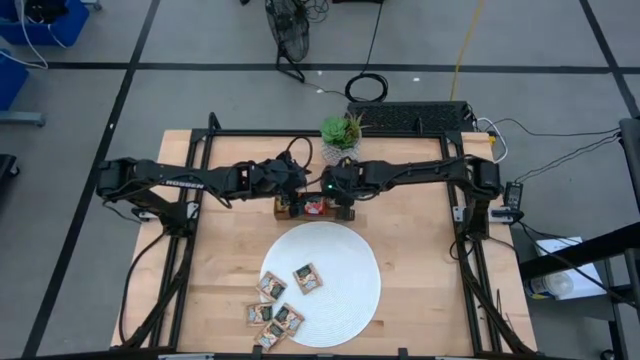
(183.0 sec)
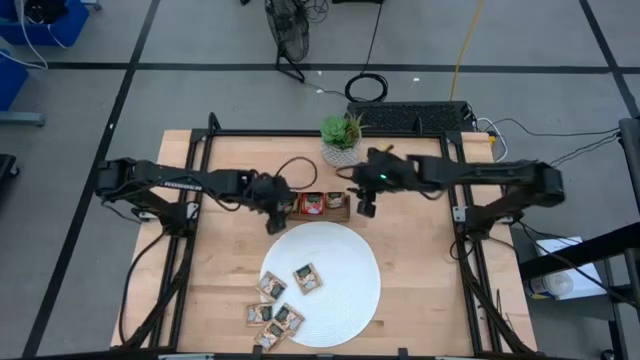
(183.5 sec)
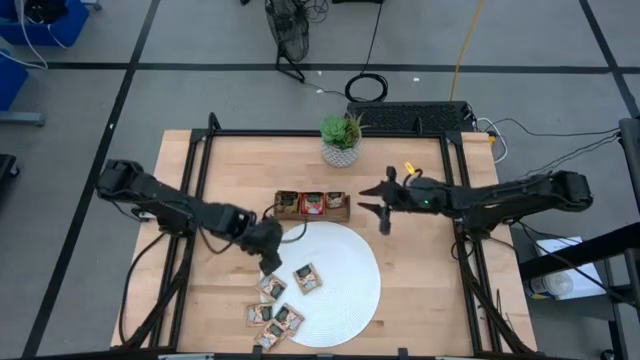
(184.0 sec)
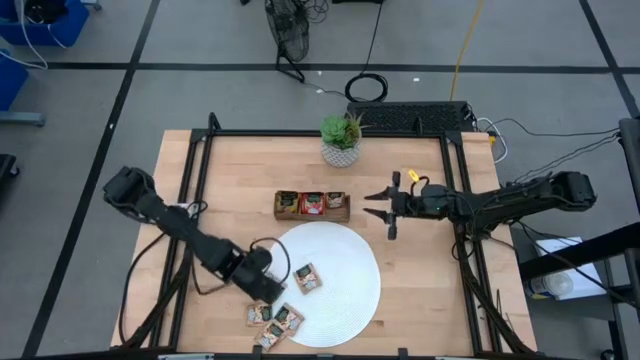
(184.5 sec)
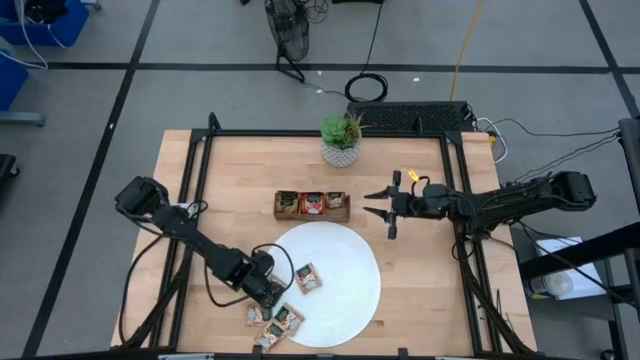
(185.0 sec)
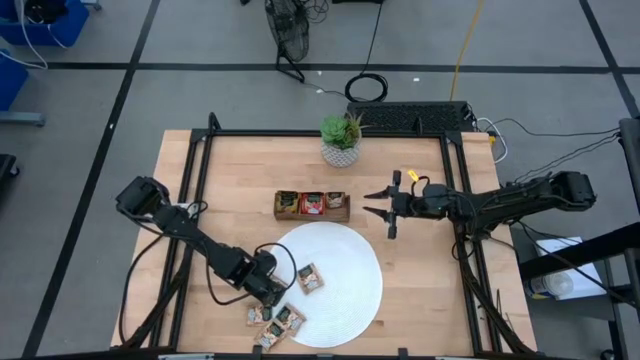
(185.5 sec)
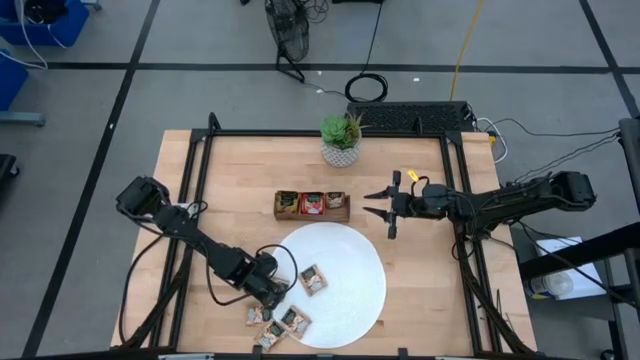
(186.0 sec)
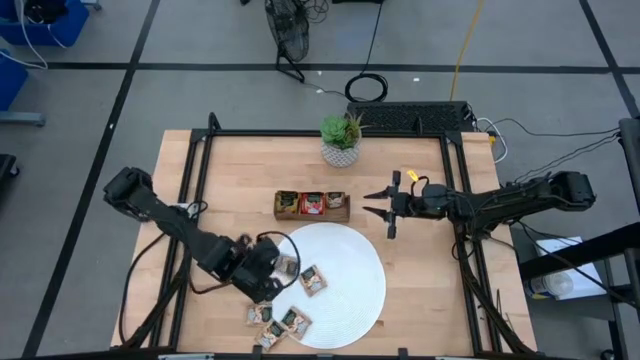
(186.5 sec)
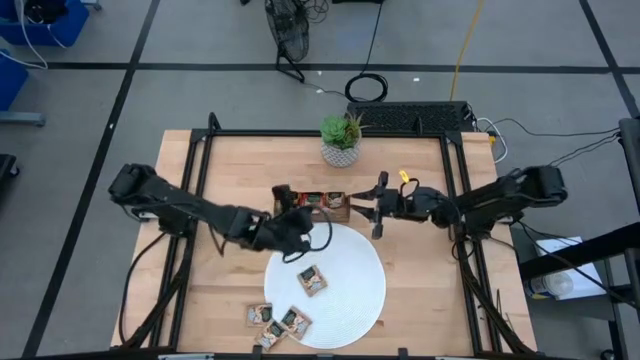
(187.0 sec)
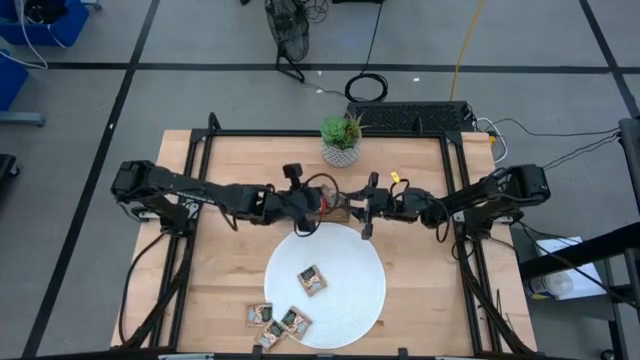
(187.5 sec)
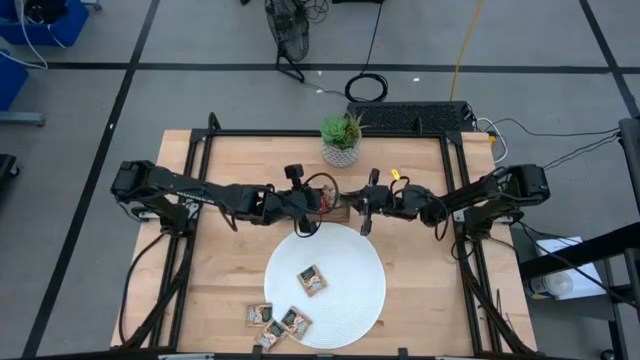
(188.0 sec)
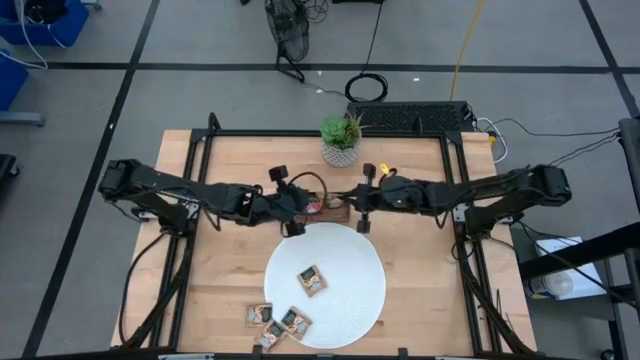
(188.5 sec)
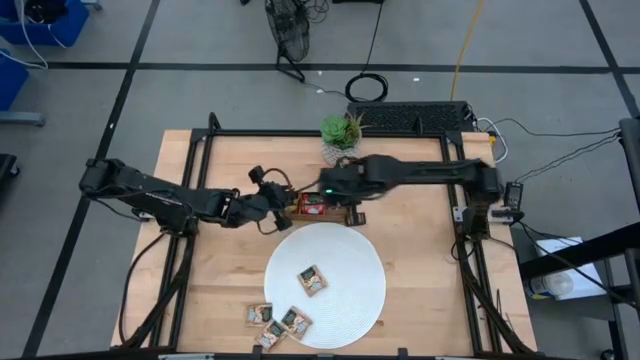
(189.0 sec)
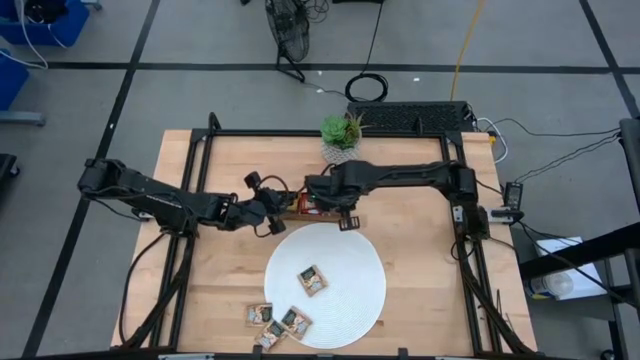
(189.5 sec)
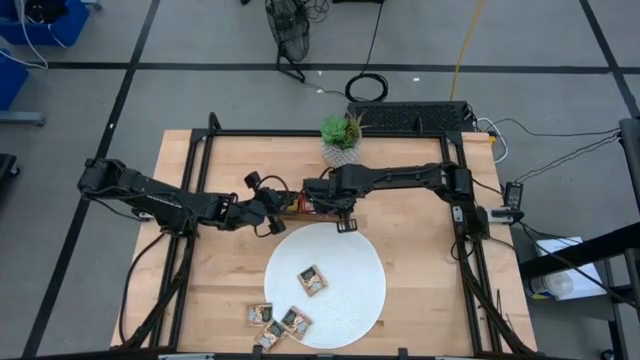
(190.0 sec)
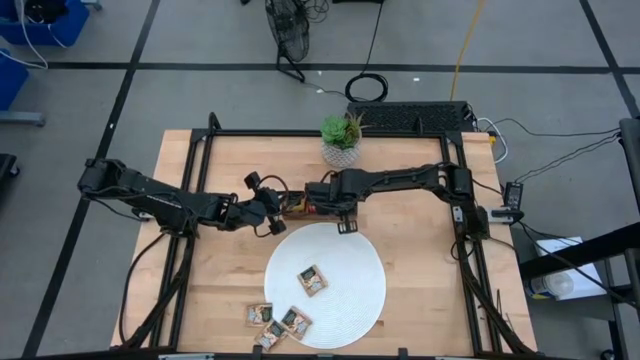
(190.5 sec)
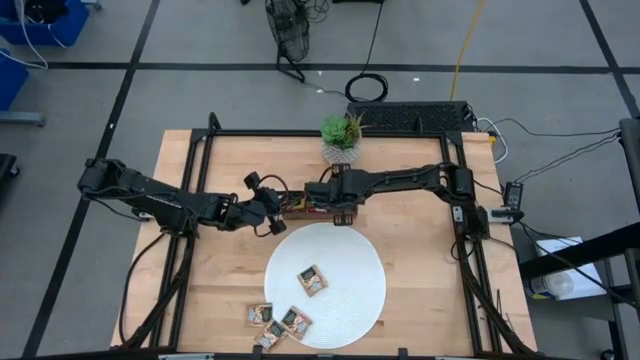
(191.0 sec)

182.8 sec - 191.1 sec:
Task: Pick & Place Tea
Put the vanilla tea bag into the wooden organizer

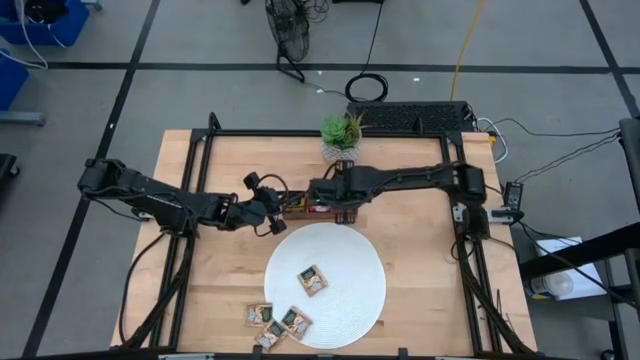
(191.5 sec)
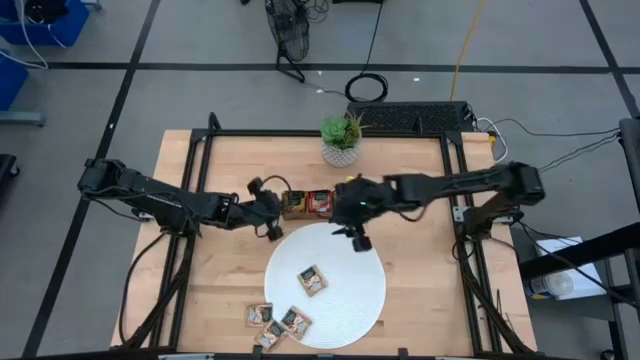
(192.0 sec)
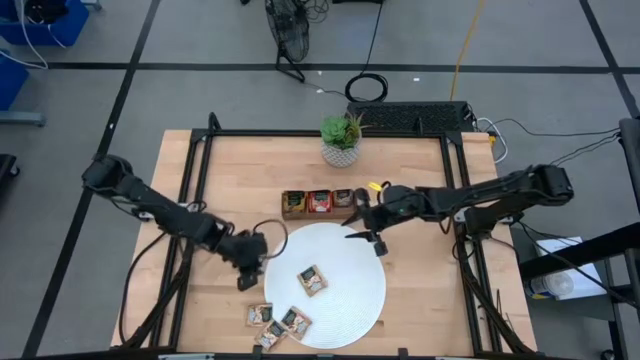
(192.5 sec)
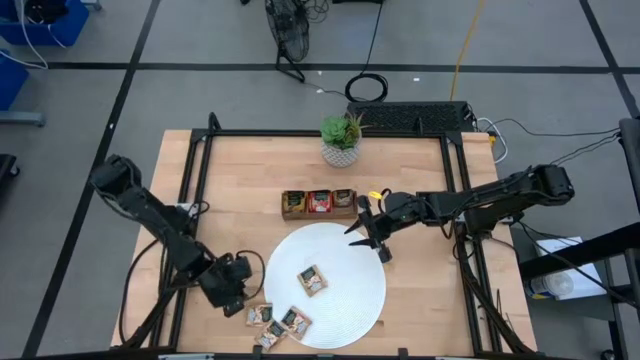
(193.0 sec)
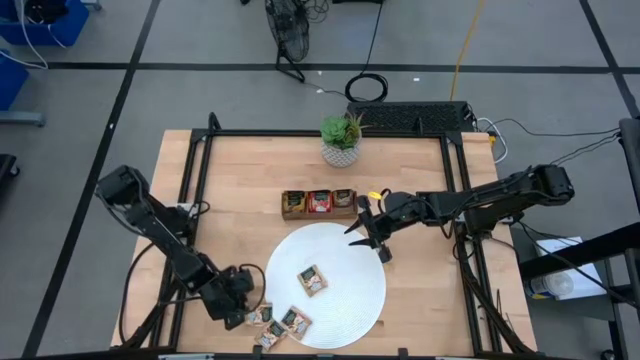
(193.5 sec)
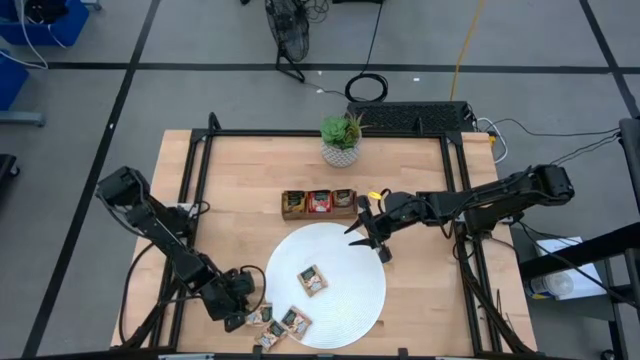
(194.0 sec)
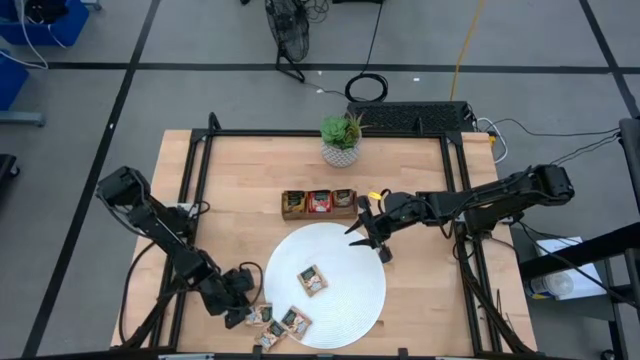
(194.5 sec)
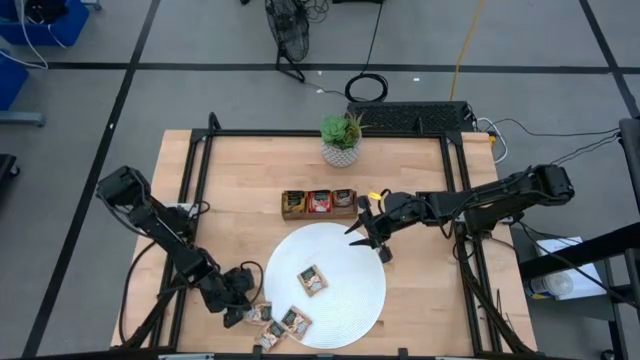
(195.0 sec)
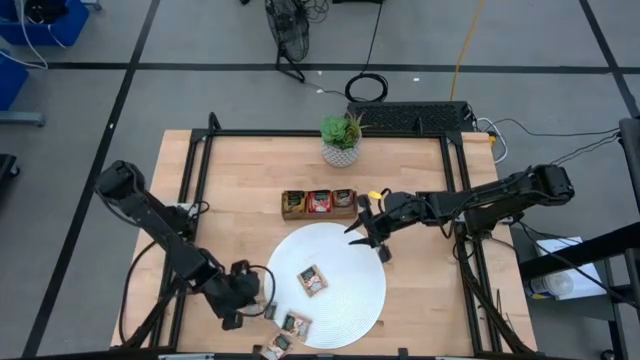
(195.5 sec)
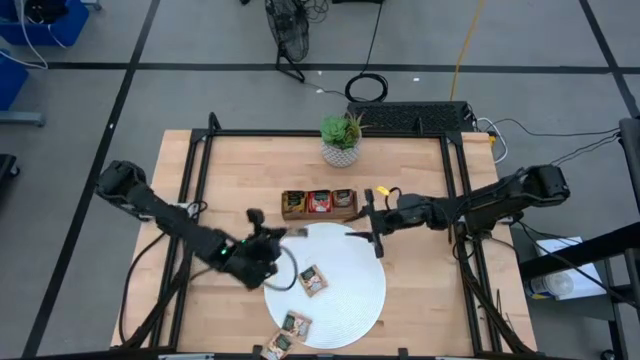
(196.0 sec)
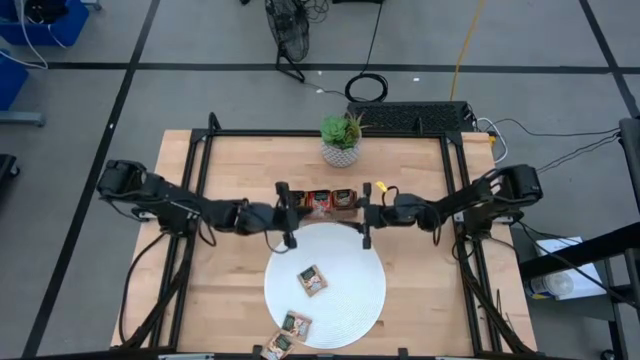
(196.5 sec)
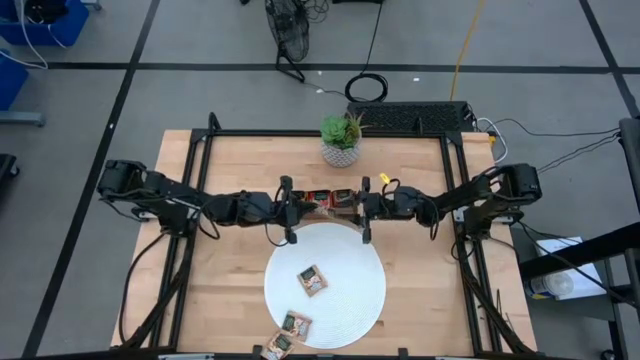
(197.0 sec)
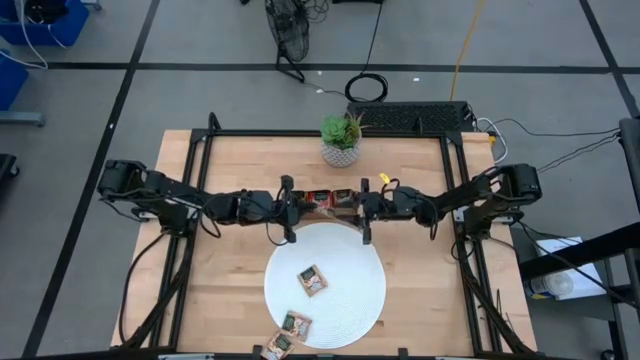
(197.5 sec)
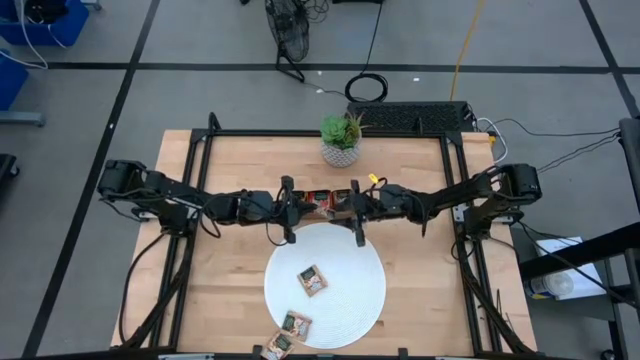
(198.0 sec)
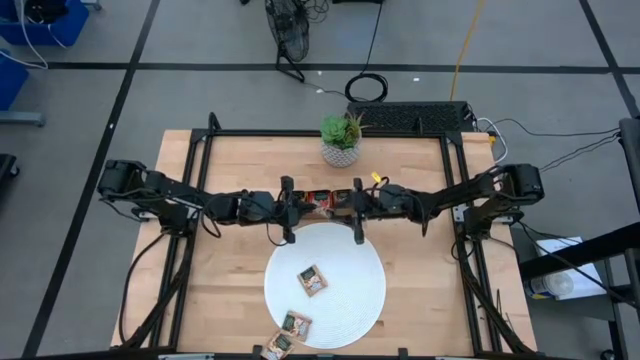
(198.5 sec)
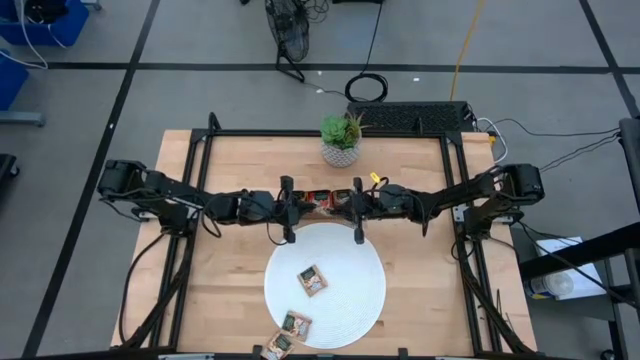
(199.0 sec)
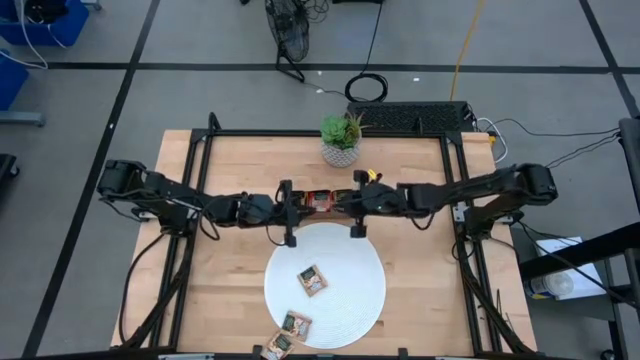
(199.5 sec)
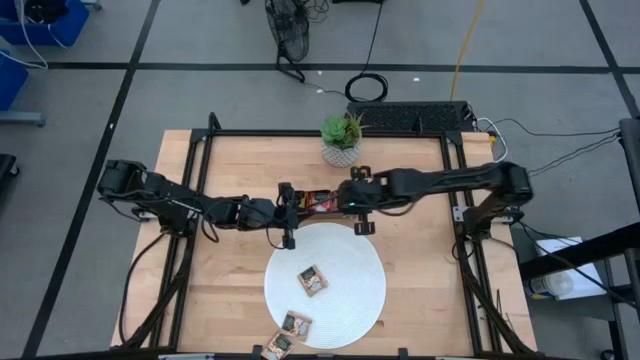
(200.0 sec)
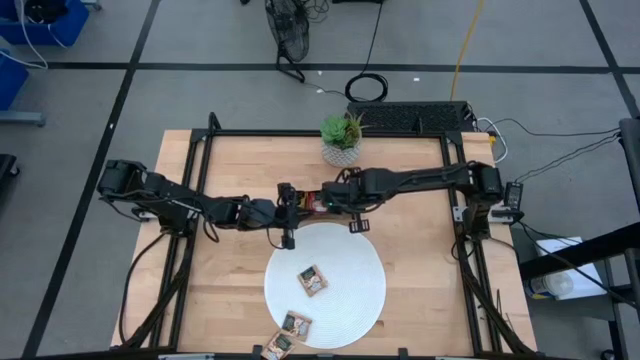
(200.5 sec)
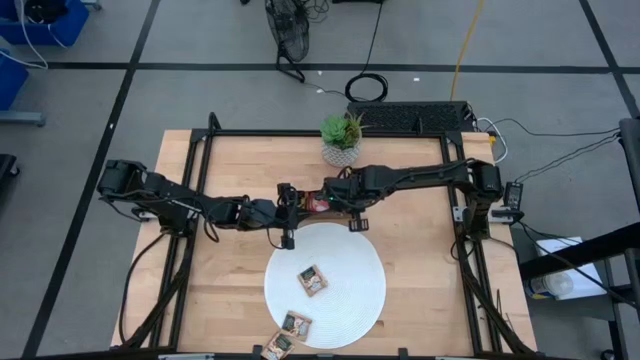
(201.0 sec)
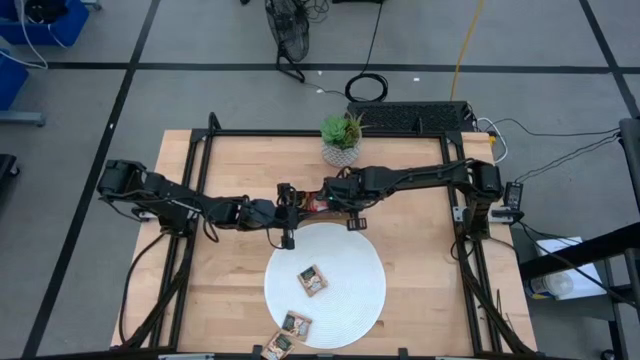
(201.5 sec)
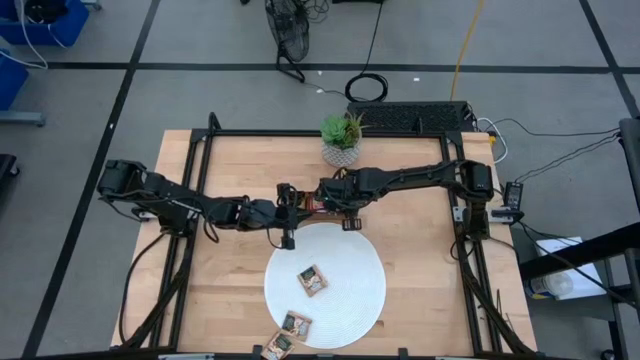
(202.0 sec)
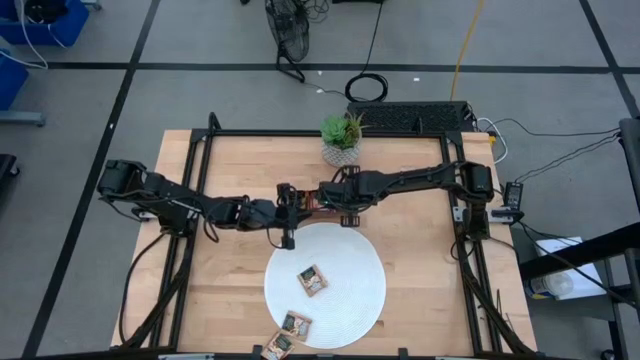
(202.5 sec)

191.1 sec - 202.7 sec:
Put the vanilla tea bag into the wooden organizer
